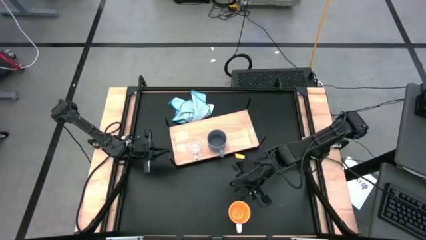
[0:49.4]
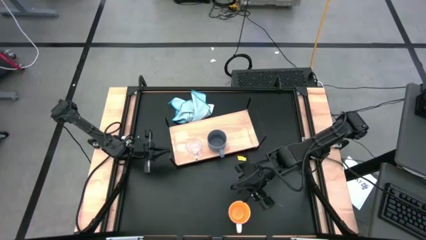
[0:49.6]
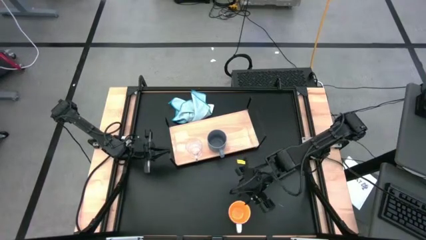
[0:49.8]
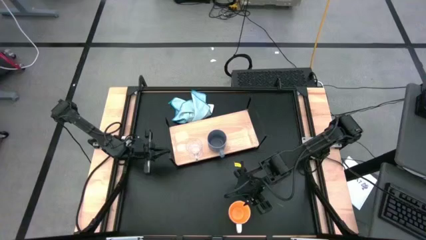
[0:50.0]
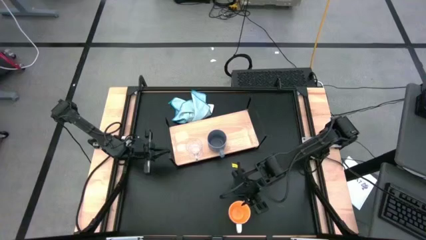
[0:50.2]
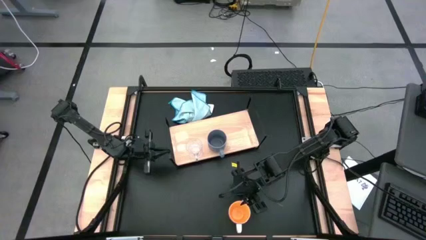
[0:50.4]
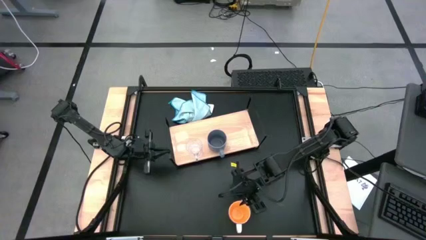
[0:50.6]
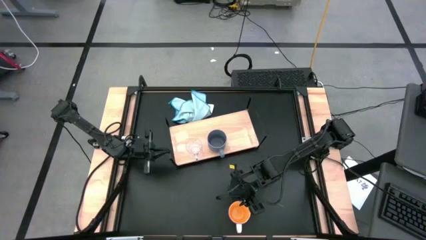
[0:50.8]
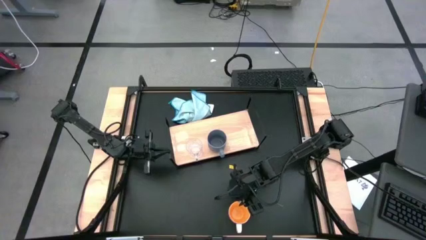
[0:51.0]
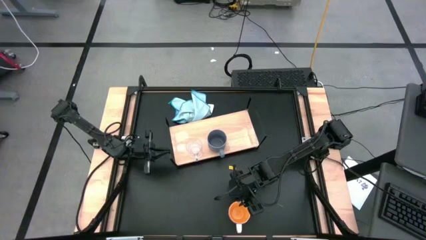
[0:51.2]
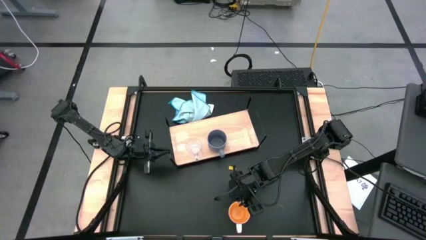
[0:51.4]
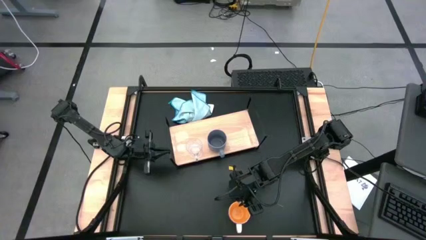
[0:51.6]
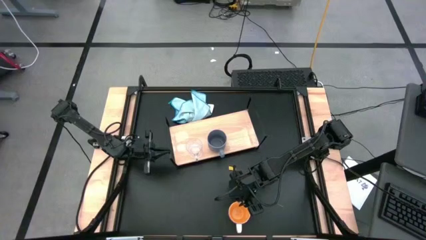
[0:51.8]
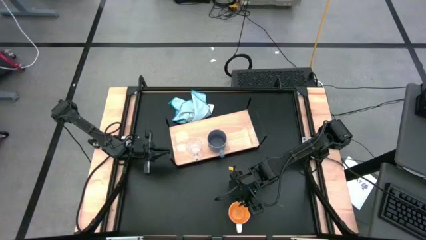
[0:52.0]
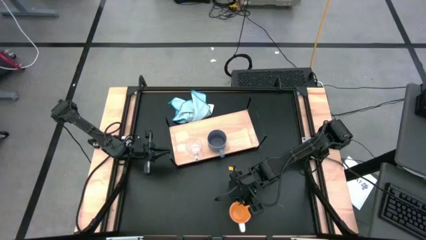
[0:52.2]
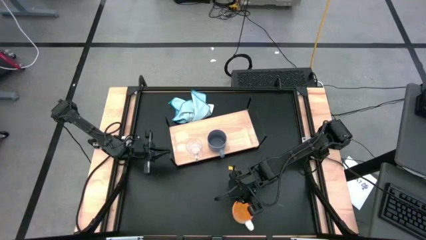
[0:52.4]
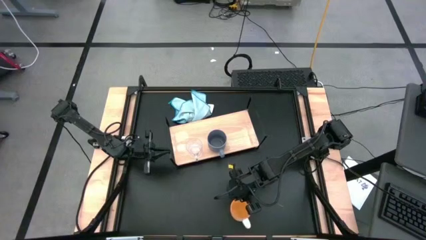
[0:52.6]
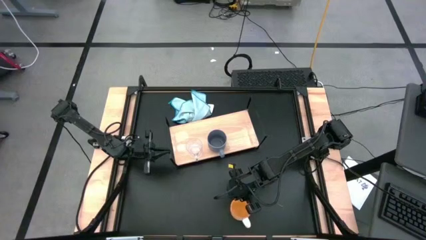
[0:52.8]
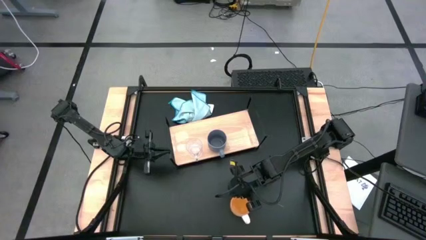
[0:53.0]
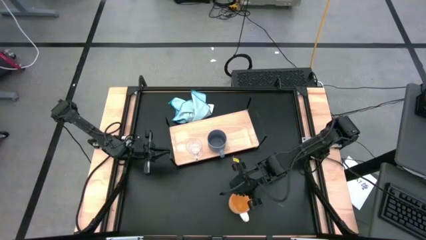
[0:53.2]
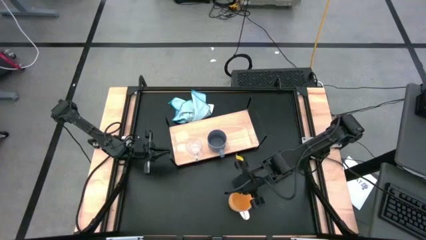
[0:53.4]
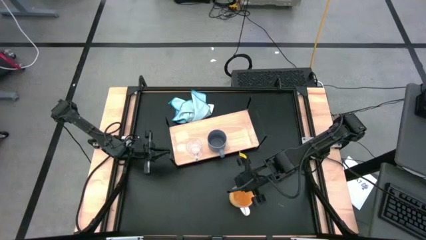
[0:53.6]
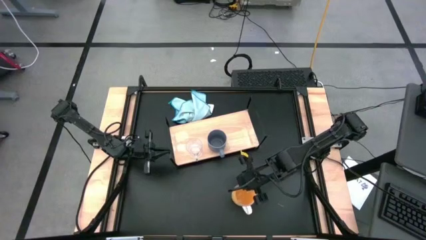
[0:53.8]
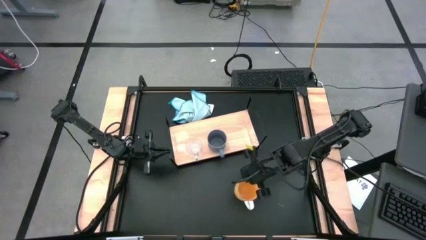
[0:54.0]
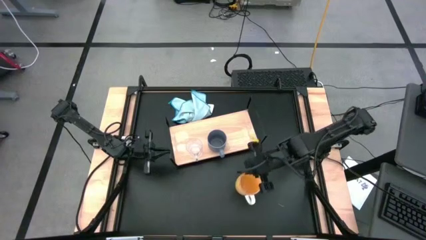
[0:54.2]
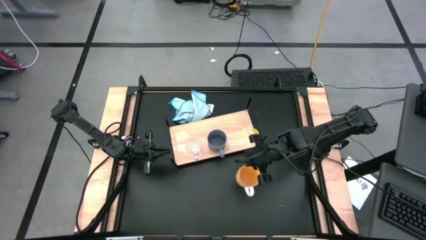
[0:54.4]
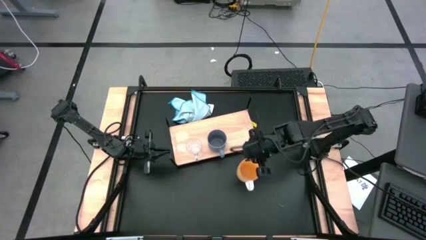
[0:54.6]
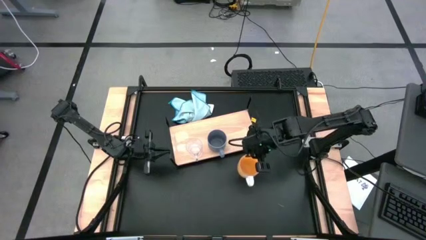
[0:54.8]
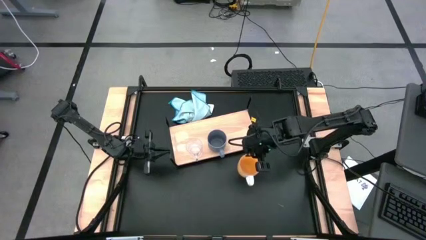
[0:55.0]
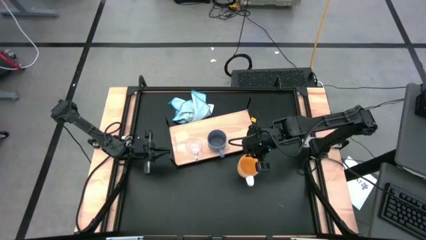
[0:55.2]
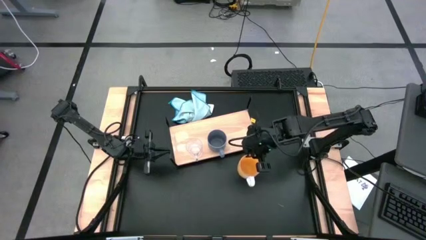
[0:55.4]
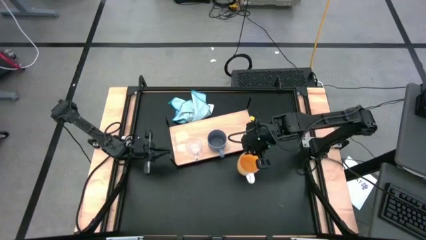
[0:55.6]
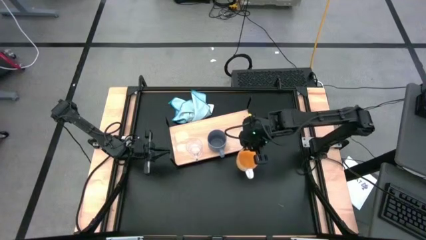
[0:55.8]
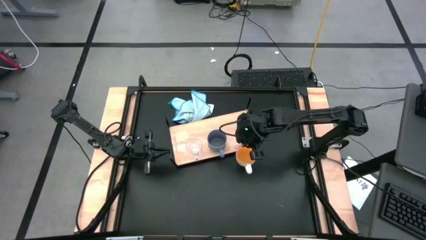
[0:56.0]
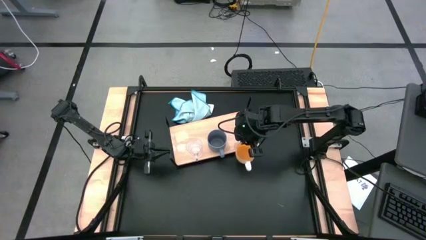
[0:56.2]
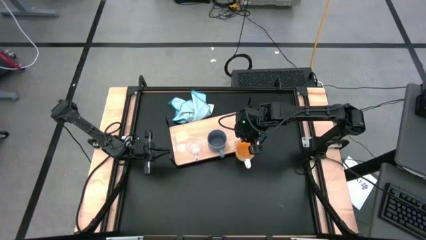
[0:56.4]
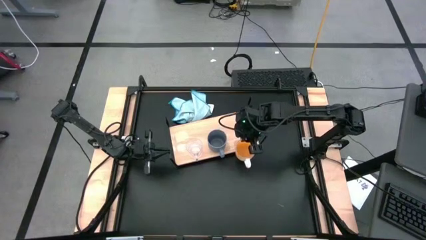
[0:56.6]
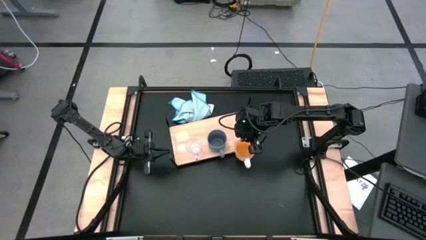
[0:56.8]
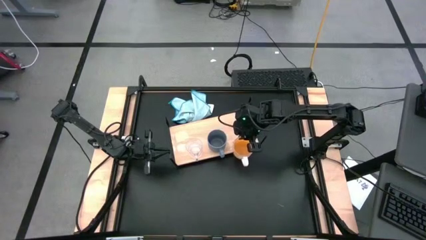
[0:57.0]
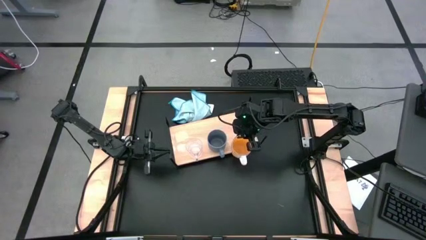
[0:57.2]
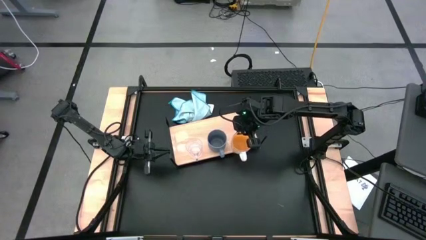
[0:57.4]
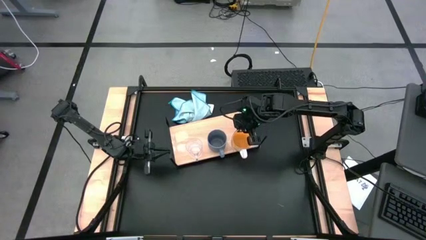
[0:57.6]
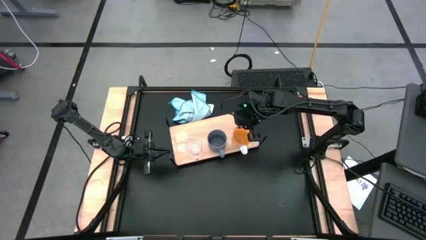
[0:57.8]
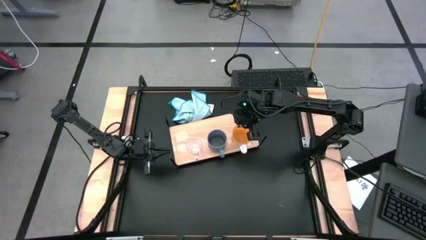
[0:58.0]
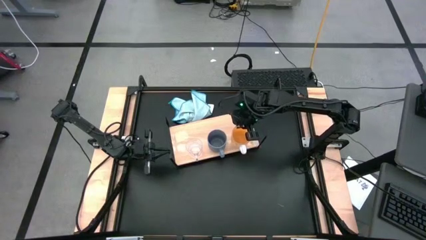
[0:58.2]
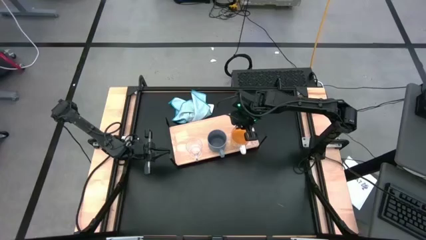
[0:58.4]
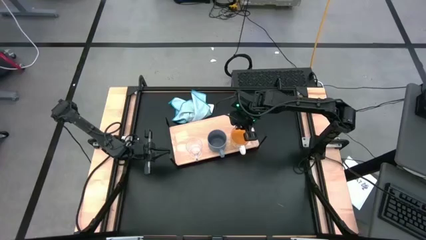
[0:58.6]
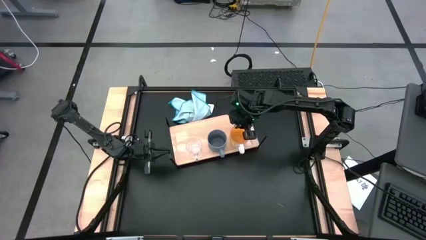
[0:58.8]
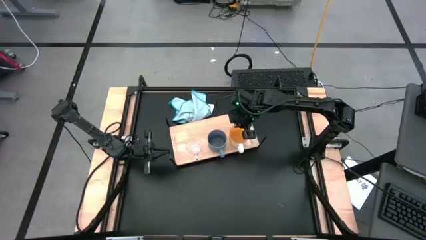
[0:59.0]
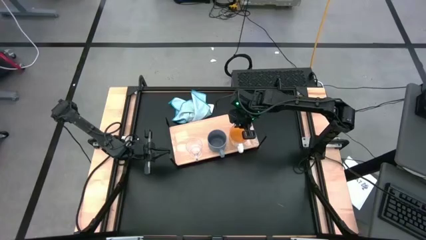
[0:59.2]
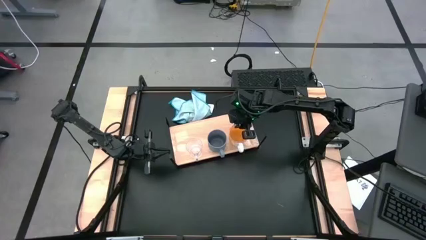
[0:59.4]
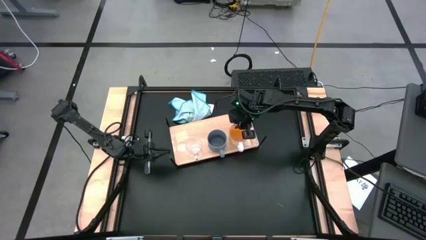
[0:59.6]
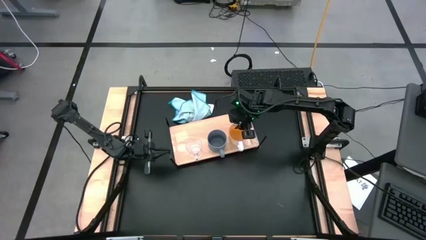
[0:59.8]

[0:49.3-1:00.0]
Task: Stack small to large cups/mugs on shelf
Put the yellow mug on the shelf

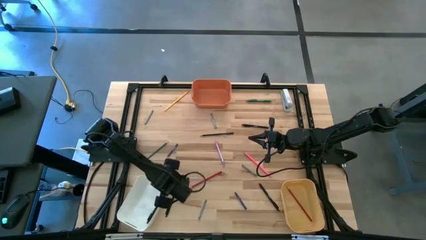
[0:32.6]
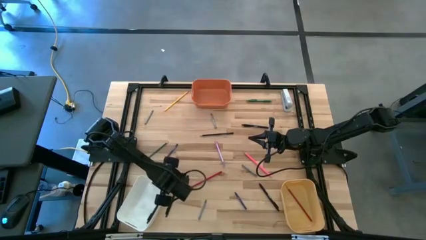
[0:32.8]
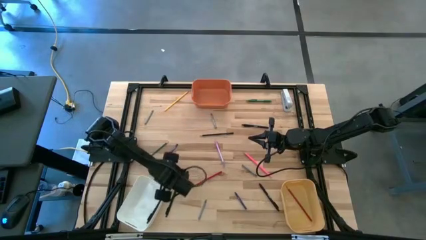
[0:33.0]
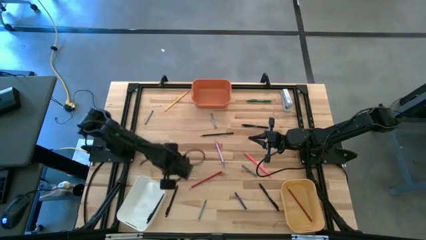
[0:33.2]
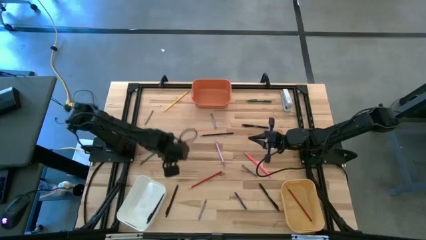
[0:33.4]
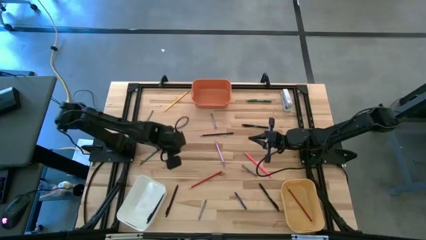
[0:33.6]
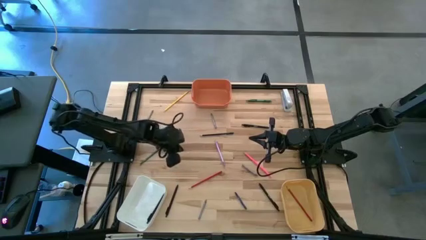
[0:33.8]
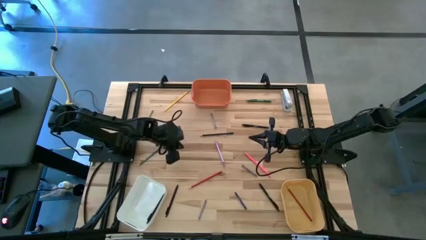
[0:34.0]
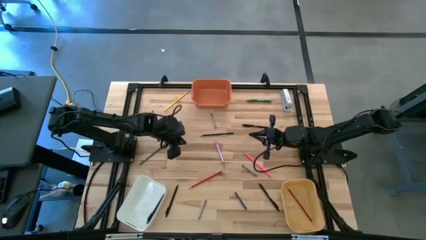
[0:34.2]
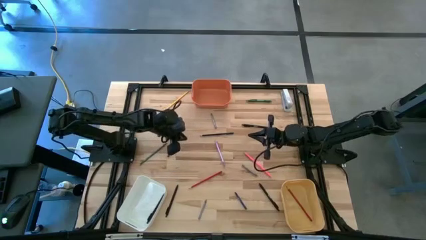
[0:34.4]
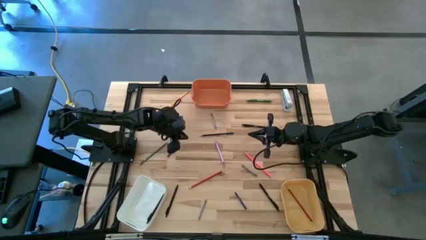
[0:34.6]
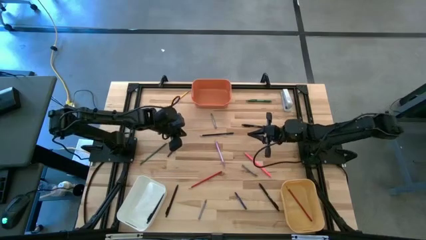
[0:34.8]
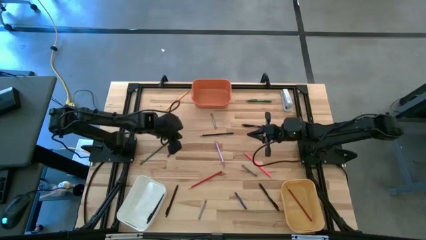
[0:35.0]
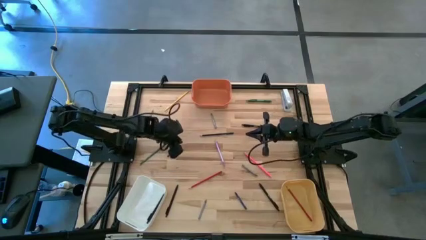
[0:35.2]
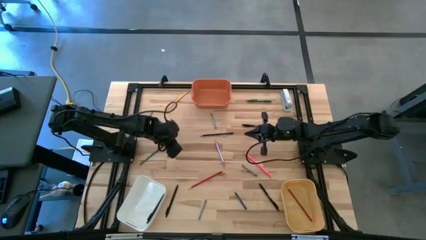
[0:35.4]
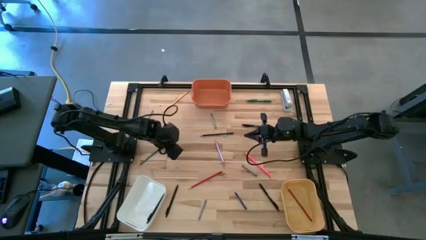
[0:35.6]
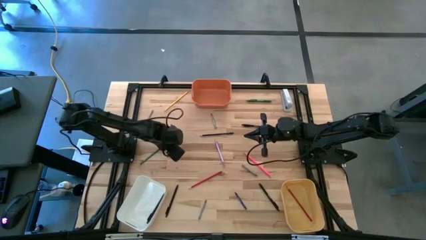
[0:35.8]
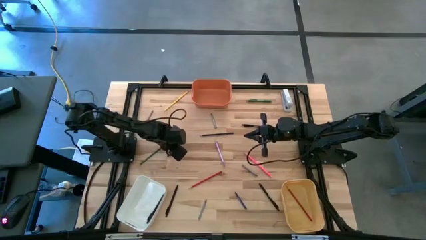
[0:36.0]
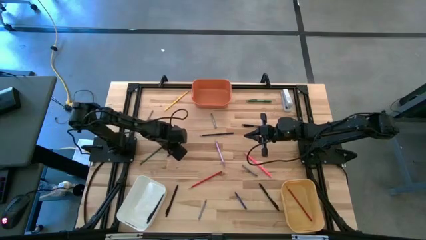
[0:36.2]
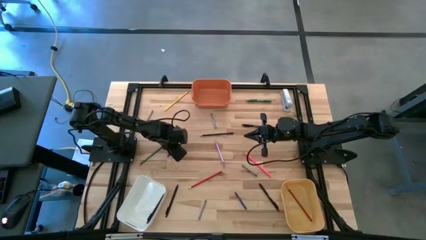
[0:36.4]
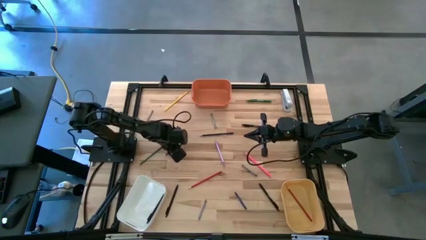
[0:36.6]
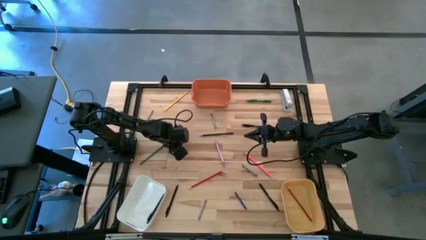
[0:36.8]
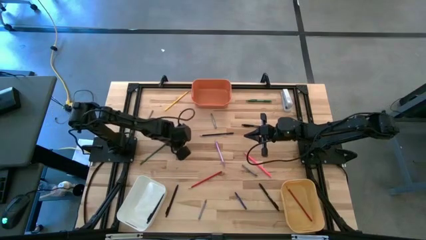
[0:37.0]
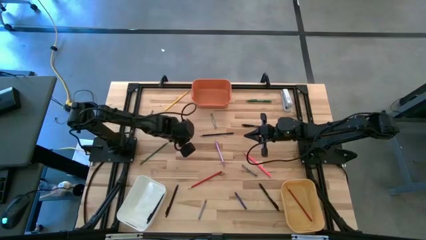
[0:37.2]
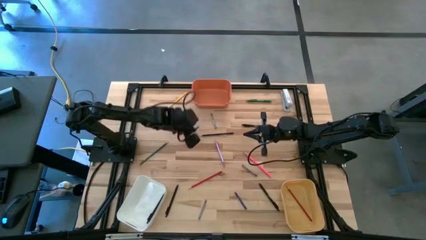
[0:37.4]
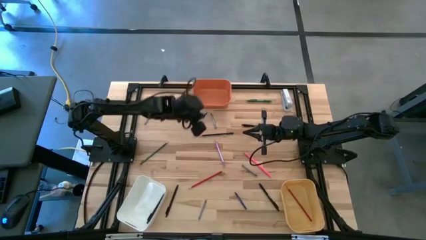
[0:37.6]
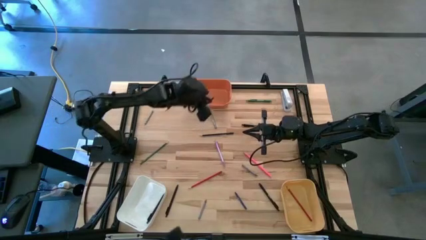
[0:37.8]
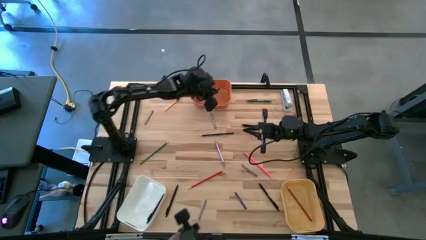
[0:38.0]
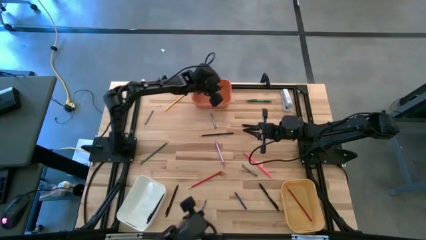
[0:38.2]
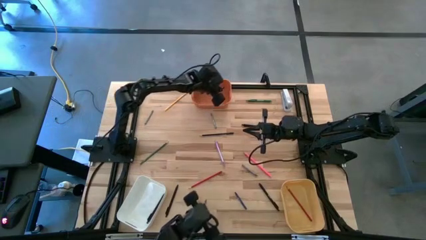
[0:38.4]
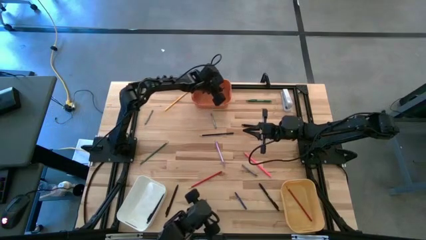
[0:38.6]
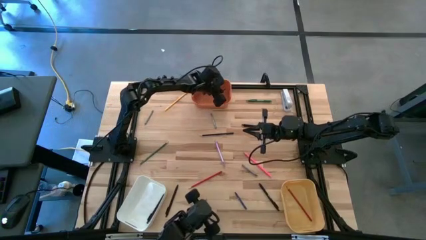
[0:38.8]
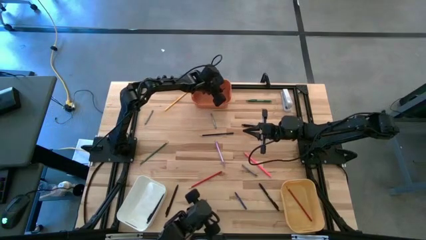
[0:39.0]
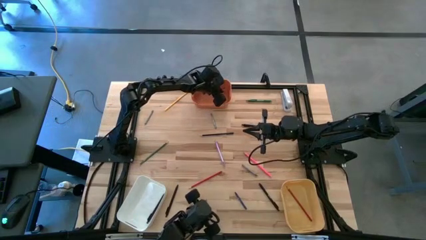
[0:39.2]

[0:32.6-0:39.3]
Task: Sort crayons/erasers/pens/pencils in bins
Put the blue crayon into the orange bin
